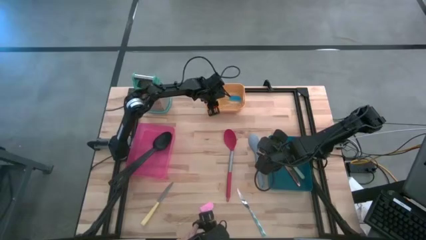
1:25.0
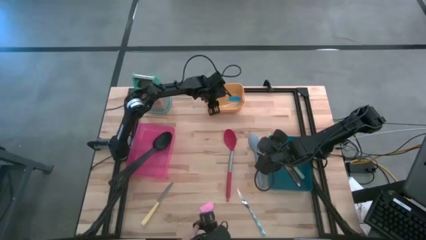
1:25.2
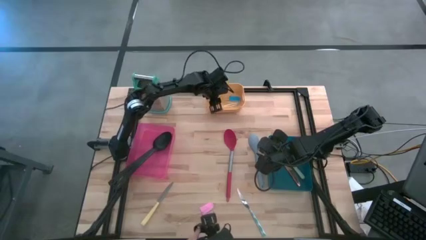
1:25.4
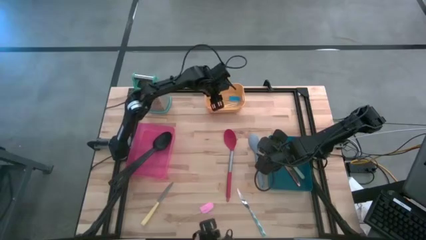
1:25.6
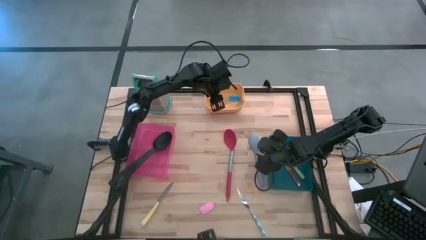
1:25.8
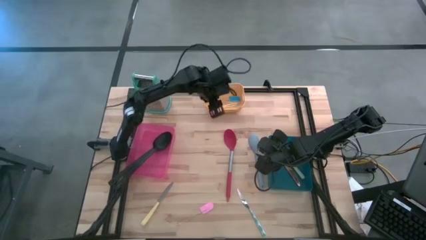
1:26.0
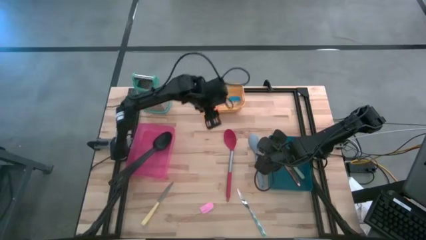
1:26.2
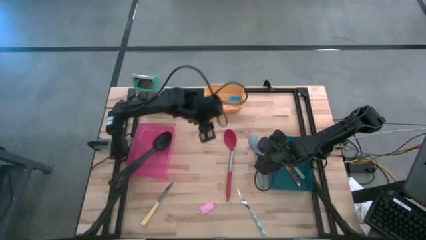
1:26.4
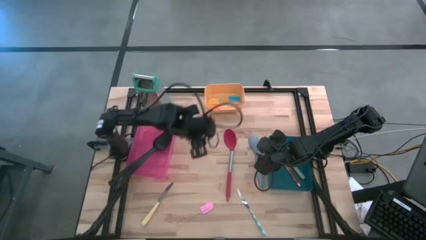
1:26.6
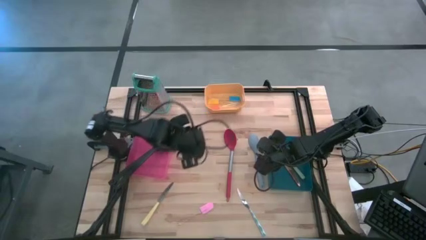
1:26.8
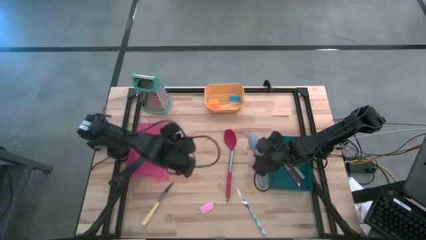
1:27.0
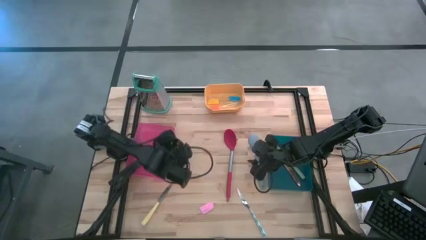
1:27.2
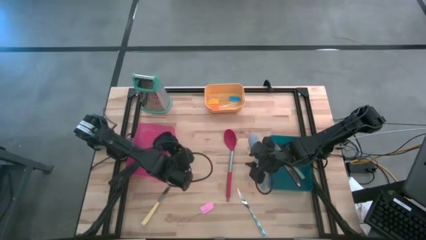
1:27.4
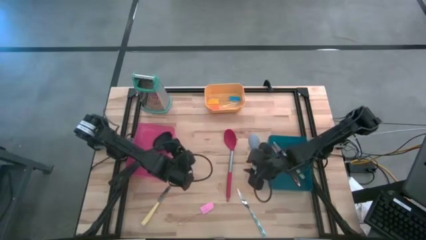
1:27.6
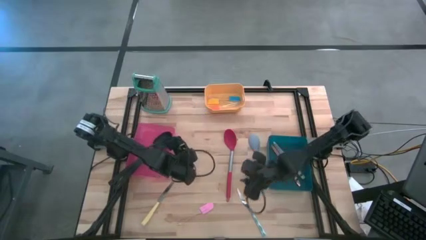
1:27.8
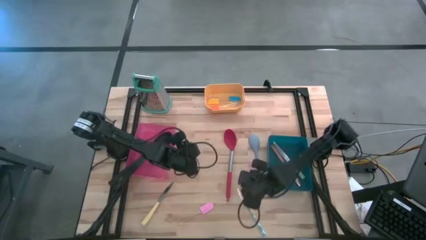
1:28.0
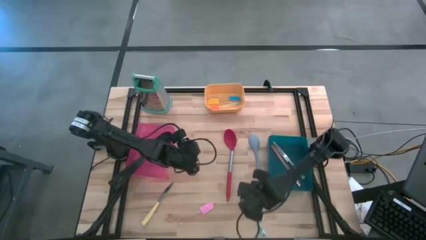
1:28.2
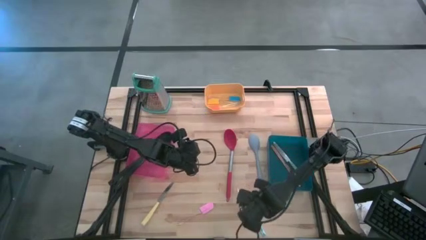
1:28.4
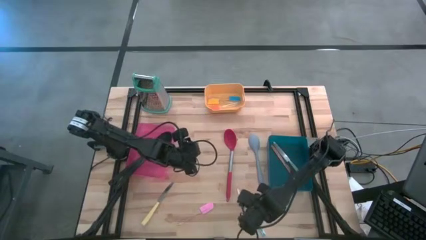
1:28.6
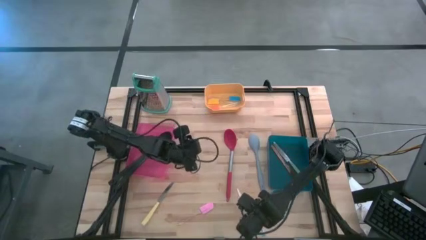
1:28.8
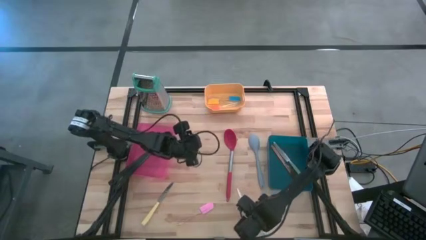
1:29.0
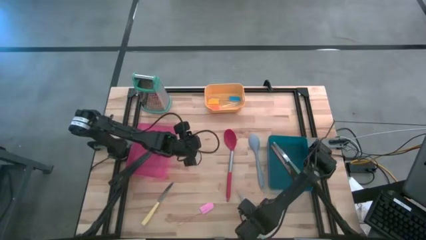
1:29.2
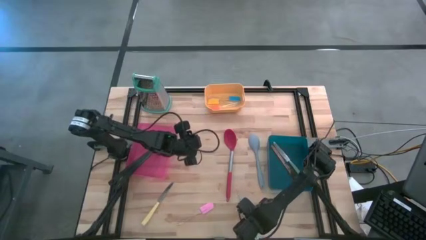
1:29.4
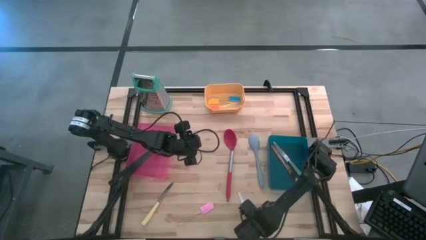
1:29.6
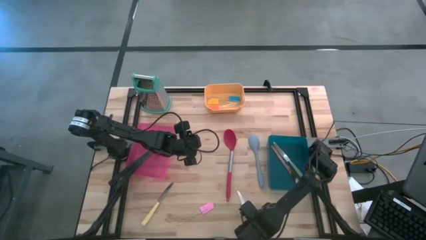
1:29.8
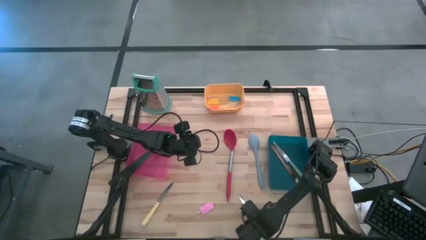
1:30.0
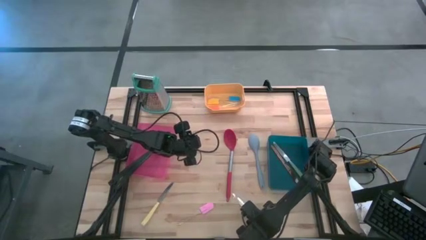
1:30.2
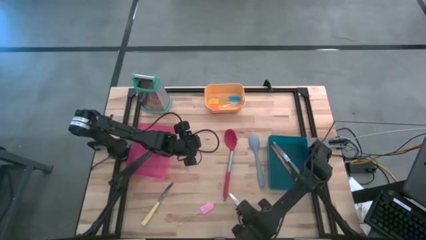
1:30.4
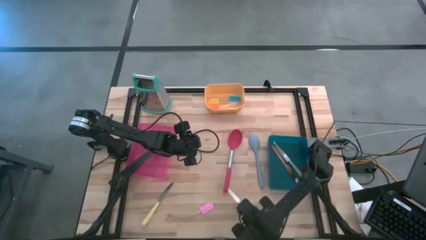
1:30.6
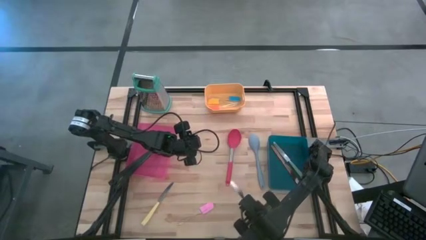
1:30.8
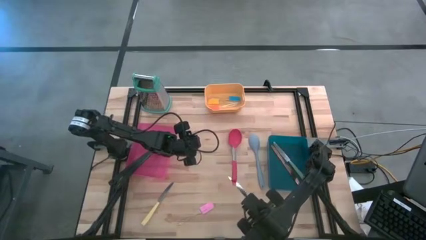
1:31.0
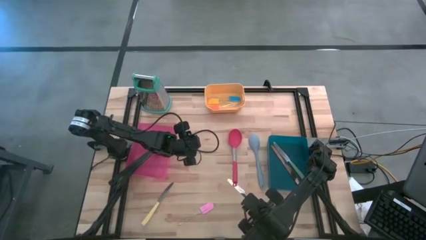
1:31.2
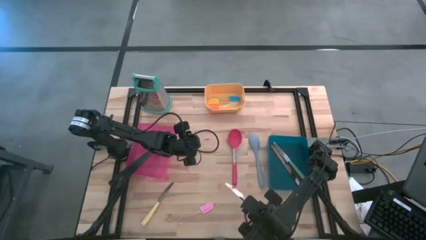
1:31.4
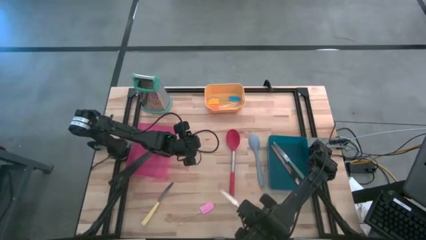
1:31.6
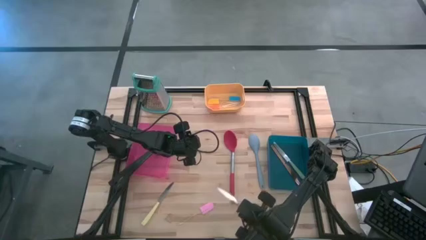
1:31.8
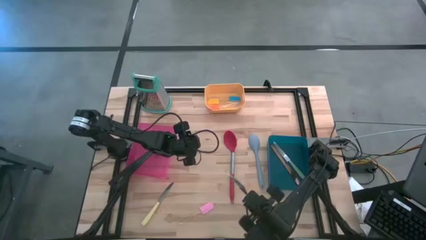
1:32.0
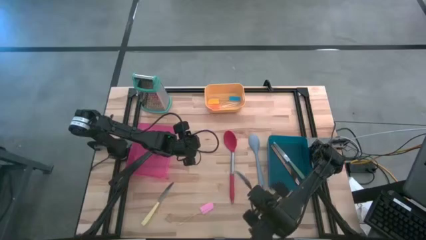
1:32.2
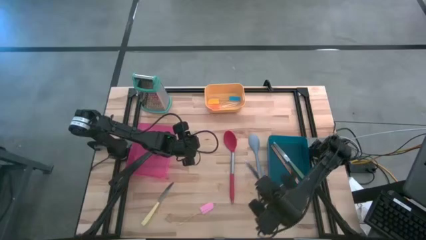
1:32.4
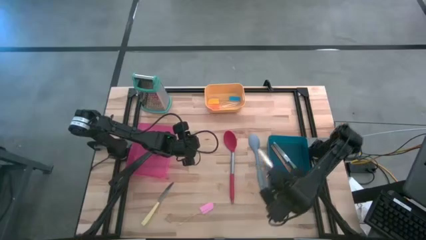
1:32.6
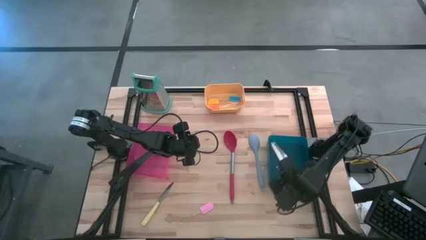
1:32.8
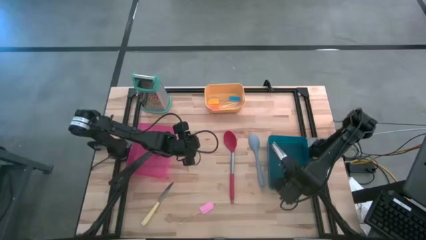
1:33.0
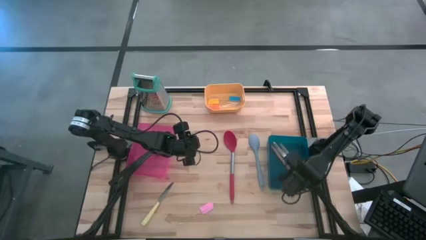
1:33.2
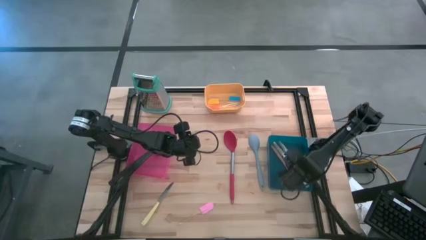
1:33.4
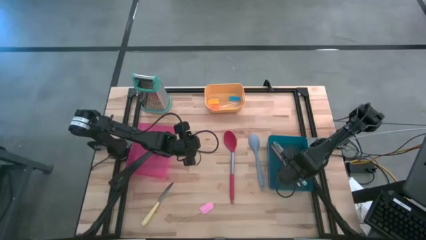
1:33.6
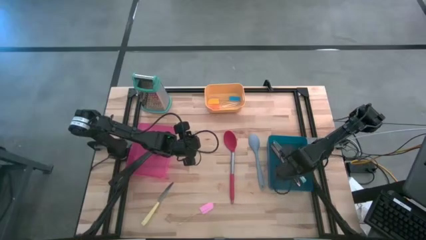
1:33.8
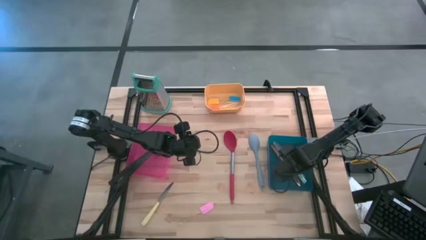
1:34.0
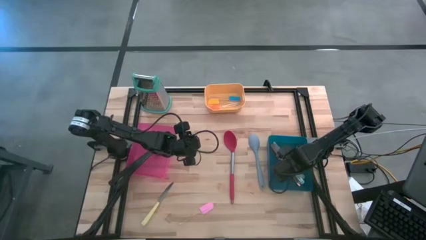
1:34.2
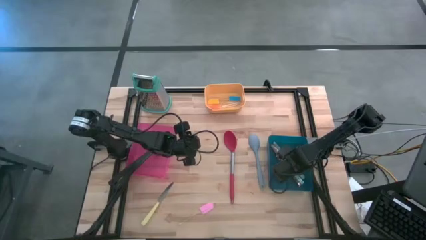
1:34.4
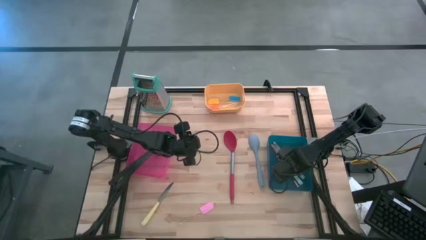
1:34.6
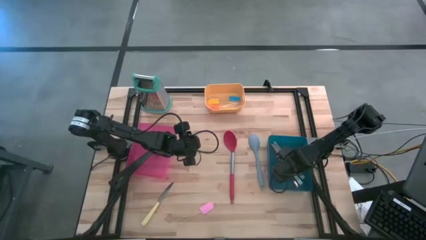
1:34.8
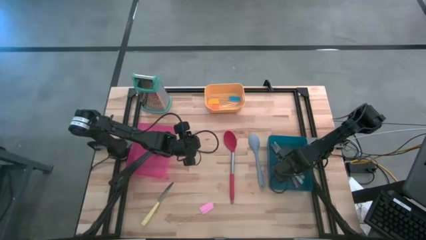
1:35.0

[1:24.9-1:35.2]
Task: Pick & Place Kitchen Items
Put the white knife into the blue bin

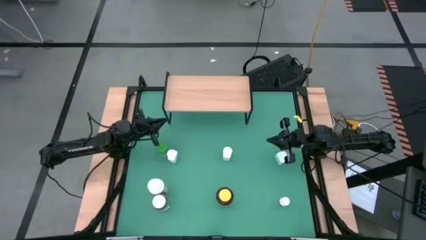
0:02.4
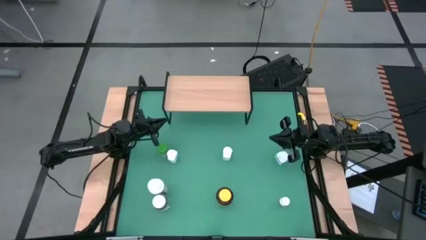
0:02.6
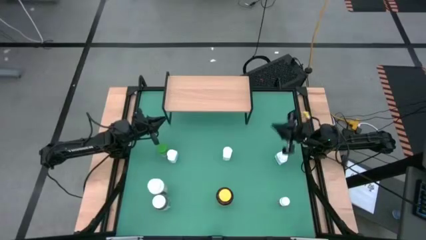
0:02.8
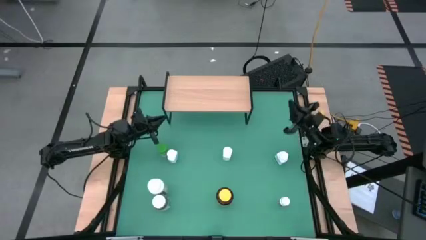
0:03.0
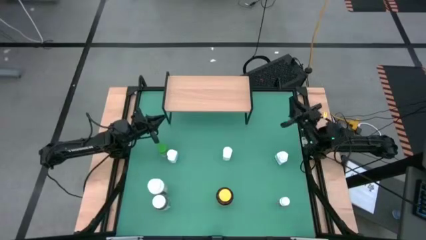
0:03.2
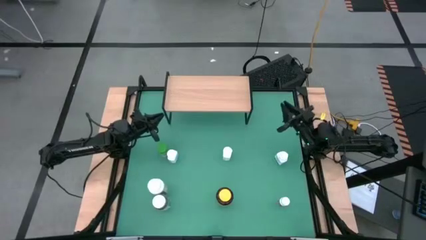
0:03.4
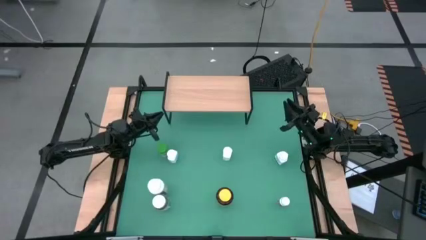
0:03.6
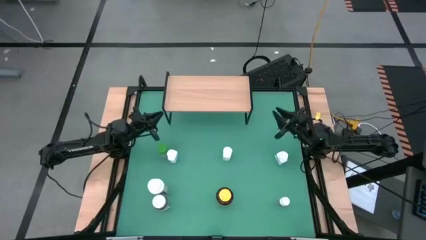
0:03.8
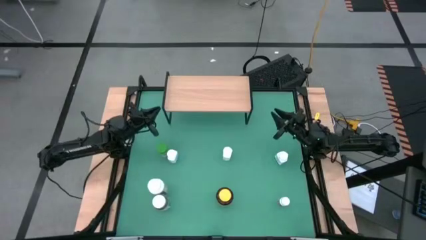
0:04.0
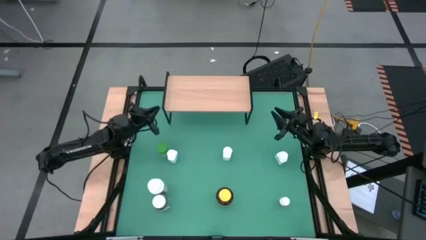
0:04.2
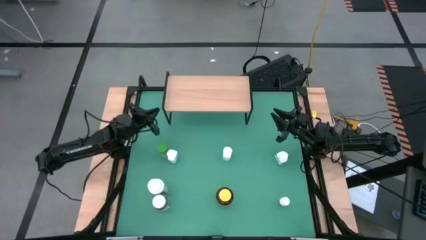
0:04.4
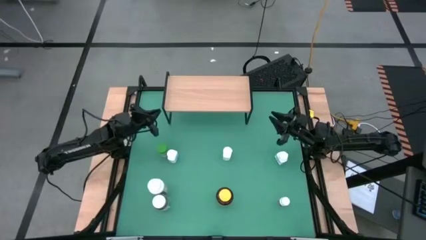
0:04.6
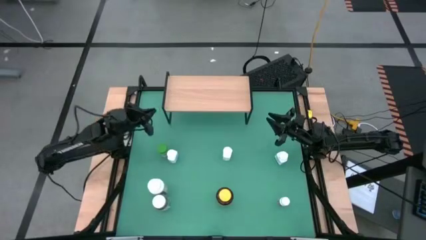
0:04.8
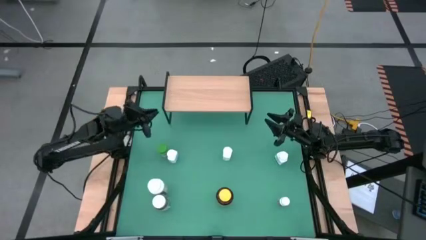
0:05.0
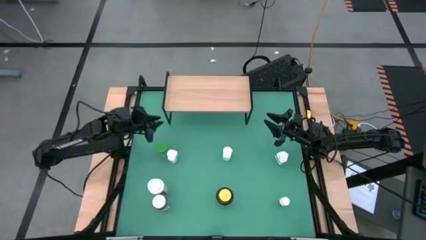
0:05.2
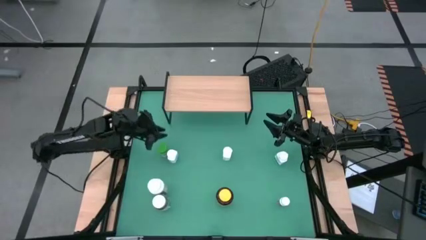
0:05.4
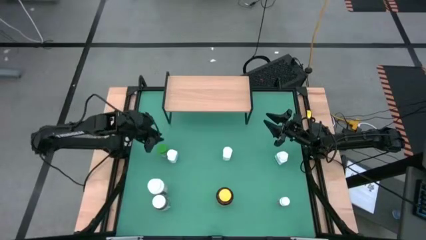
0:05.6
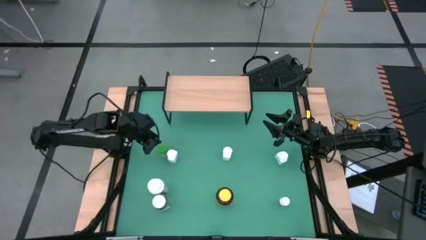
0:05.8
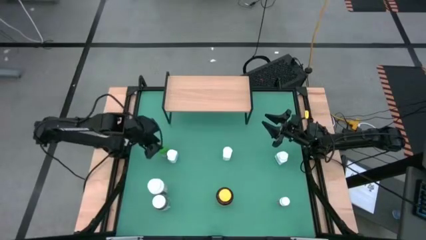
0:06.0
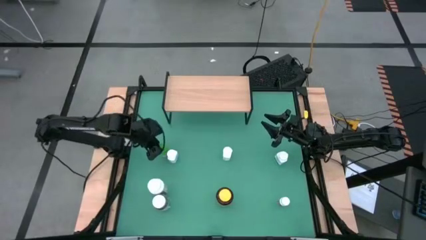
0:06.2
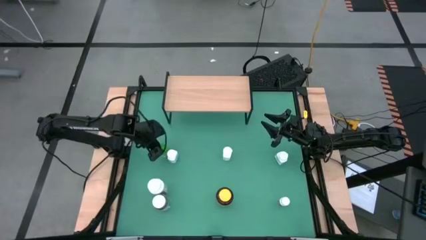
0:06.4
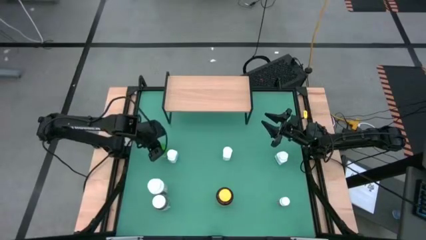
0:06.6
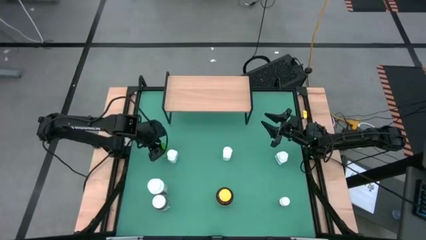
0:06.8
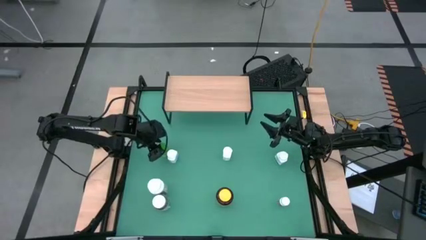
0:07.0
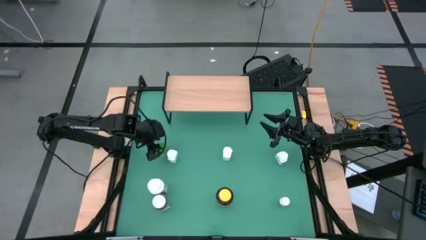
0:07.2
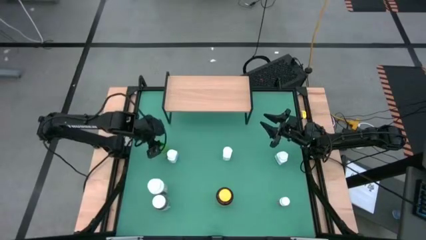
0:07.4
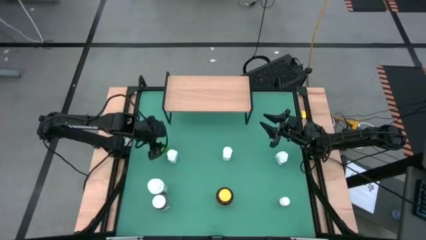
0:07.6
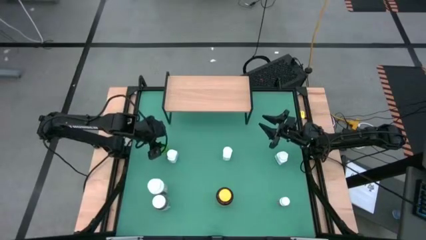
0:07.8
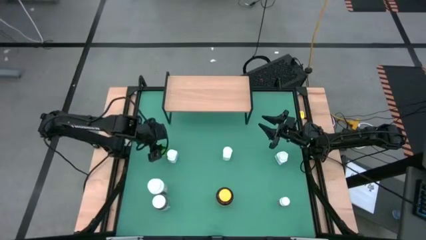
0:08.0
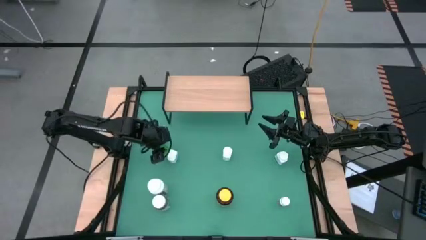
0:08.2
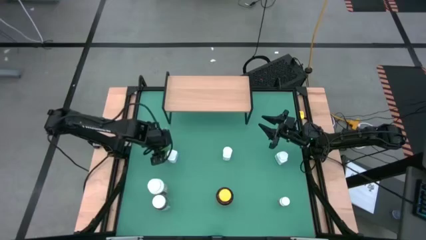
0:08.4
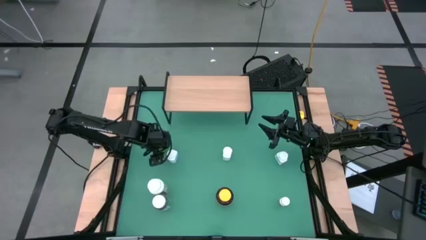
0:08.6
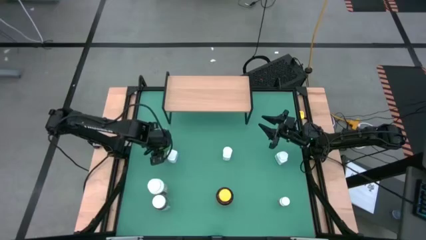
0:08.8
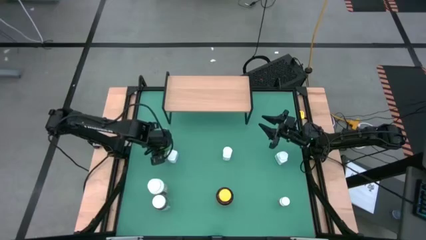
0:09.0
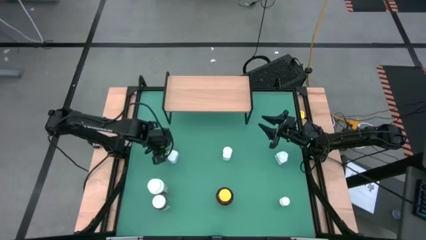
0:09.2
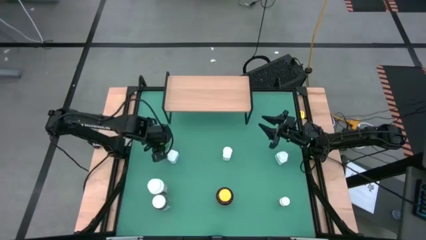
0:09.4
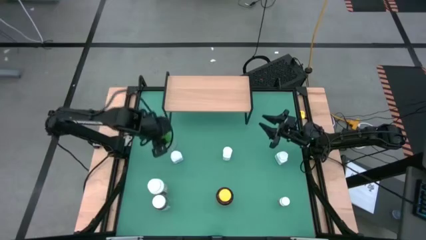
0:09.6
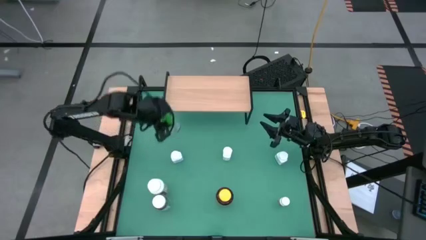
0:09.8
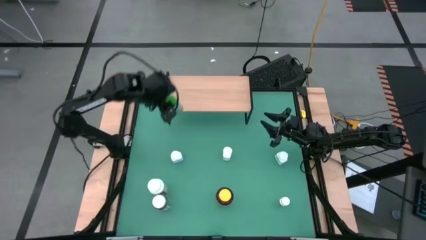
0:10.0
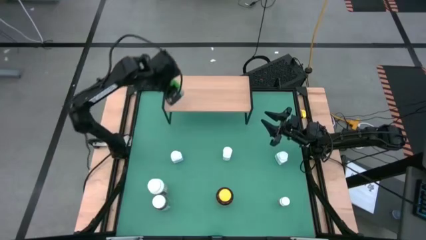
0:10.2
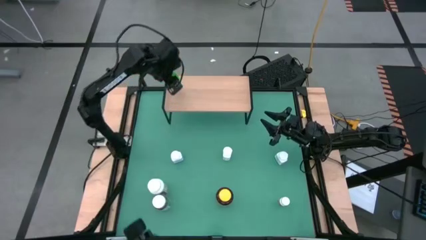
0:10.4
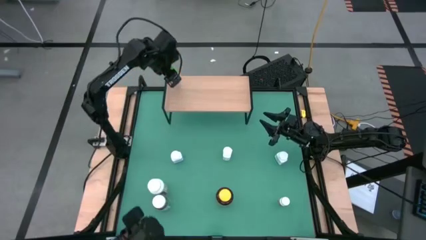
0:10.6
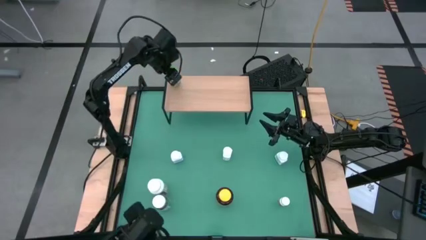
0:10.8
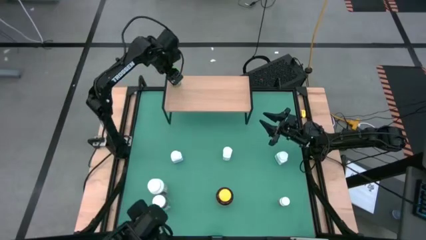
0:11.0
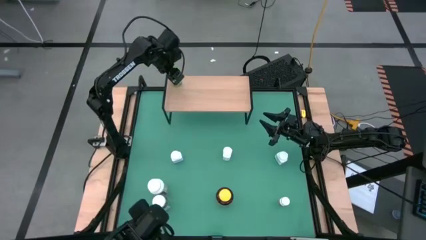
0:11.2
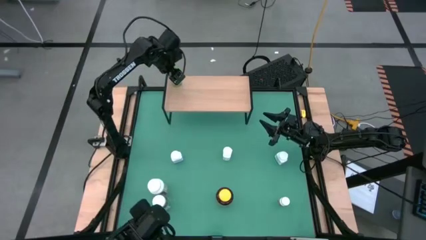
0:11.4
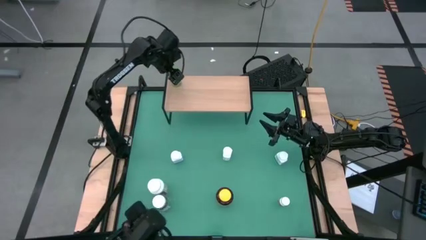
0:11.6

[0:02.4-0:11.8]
Task: Pick and place medicine bottles onto shelf by color
Put the green supplement bottle on the shelf
